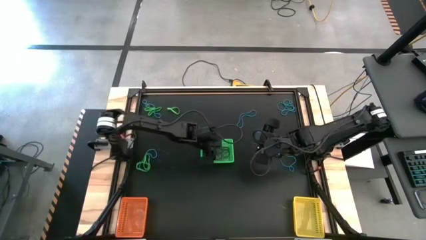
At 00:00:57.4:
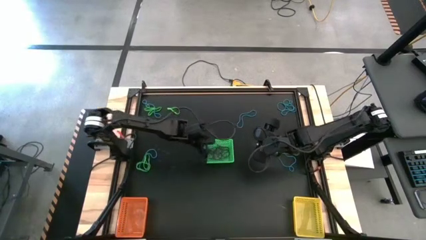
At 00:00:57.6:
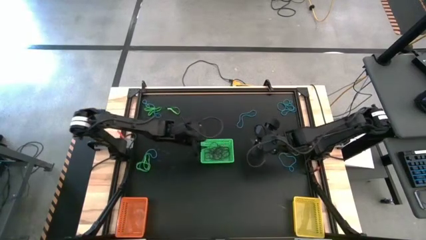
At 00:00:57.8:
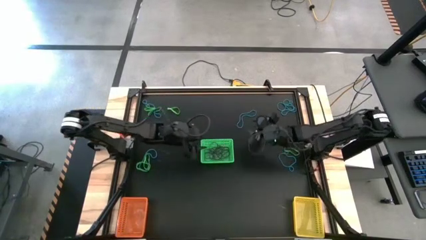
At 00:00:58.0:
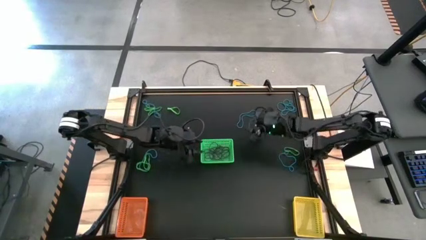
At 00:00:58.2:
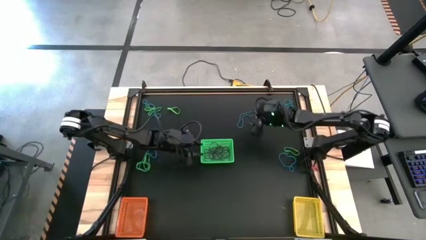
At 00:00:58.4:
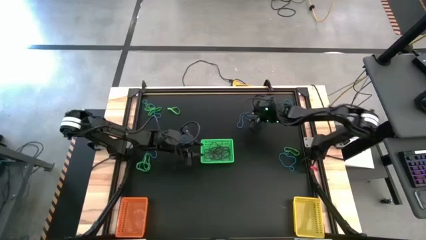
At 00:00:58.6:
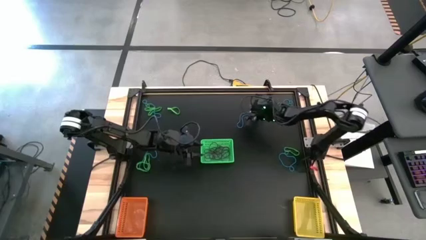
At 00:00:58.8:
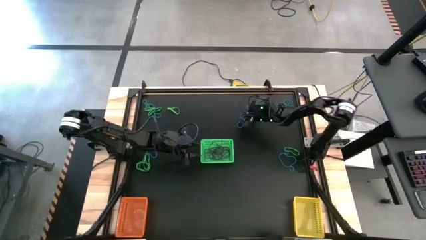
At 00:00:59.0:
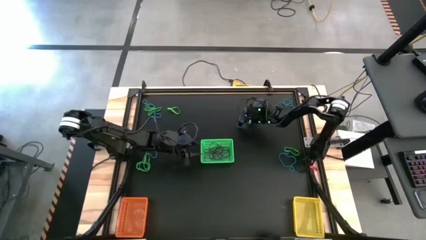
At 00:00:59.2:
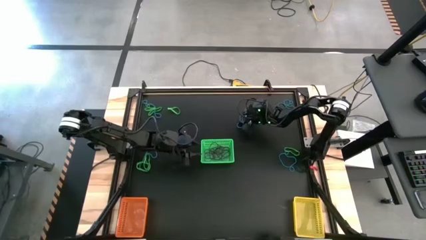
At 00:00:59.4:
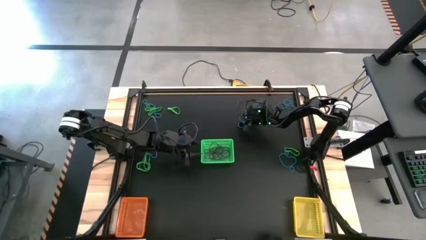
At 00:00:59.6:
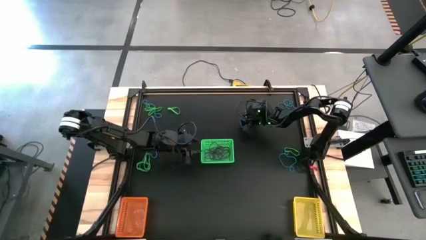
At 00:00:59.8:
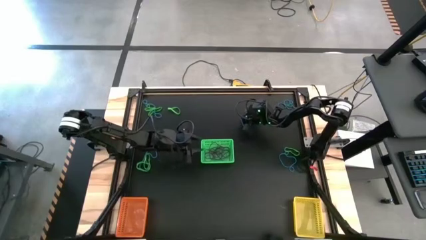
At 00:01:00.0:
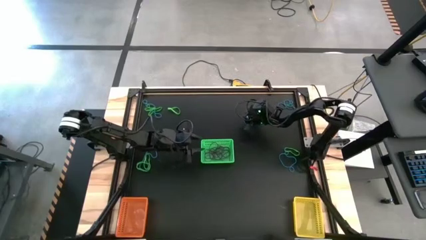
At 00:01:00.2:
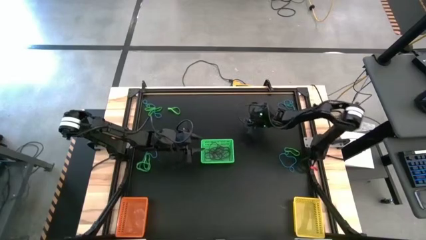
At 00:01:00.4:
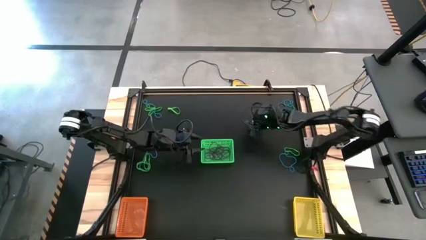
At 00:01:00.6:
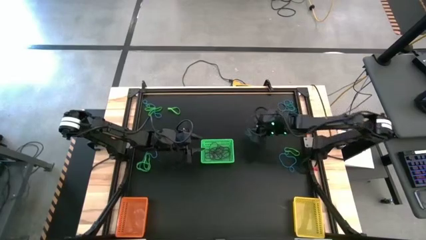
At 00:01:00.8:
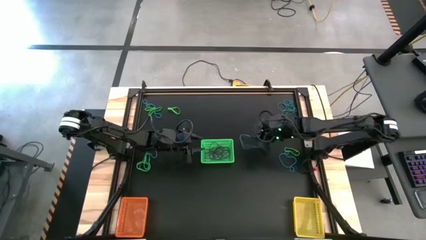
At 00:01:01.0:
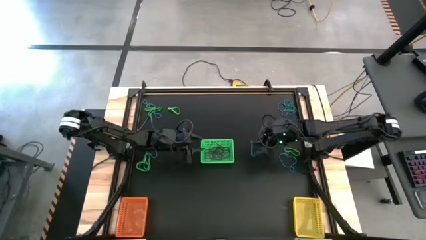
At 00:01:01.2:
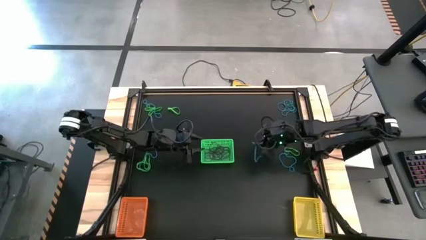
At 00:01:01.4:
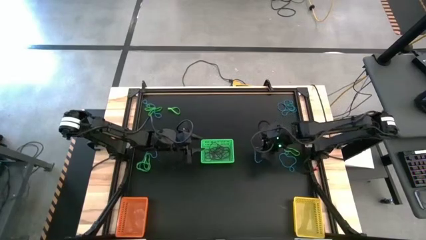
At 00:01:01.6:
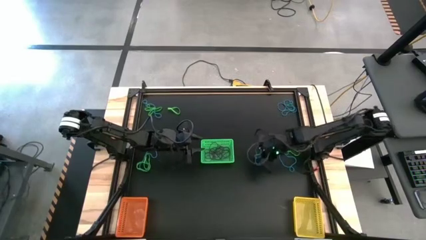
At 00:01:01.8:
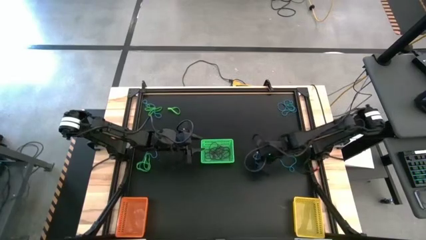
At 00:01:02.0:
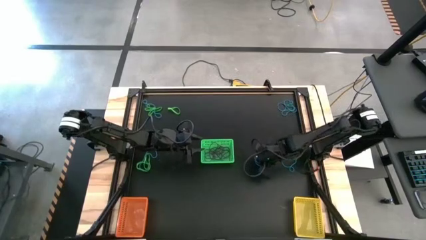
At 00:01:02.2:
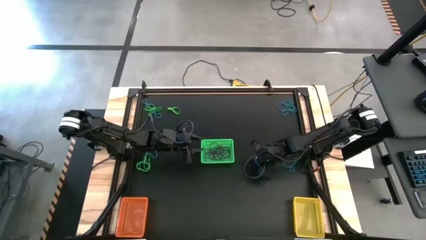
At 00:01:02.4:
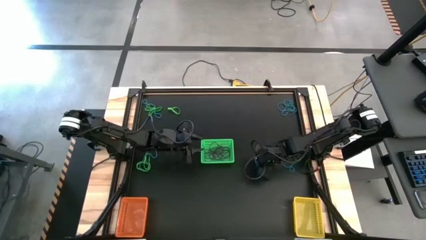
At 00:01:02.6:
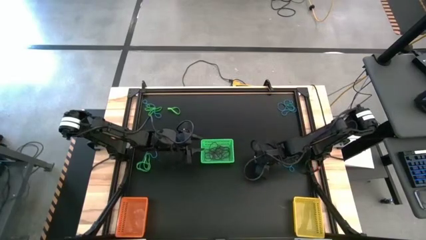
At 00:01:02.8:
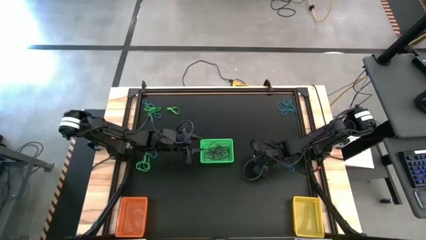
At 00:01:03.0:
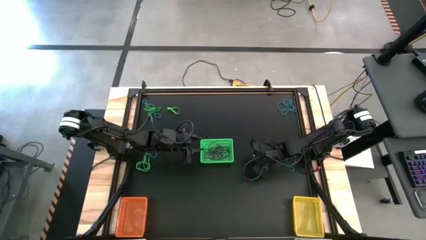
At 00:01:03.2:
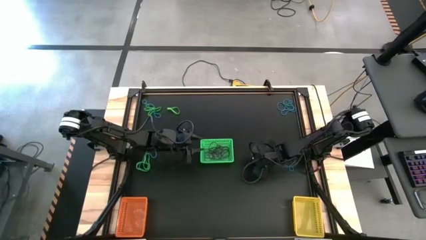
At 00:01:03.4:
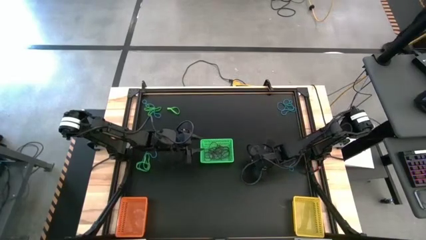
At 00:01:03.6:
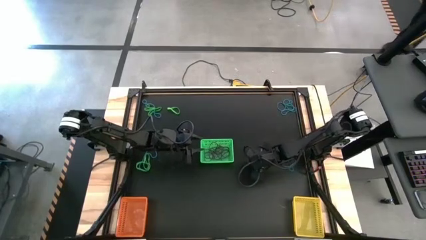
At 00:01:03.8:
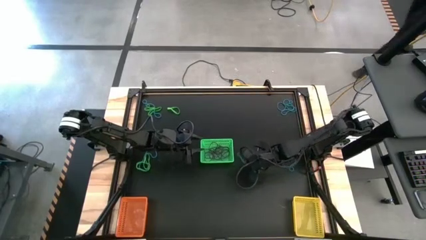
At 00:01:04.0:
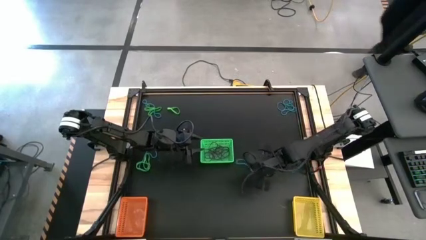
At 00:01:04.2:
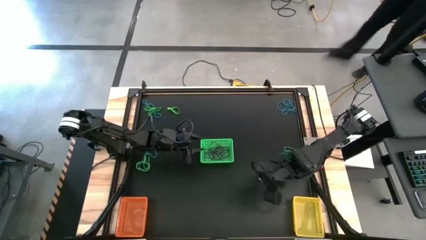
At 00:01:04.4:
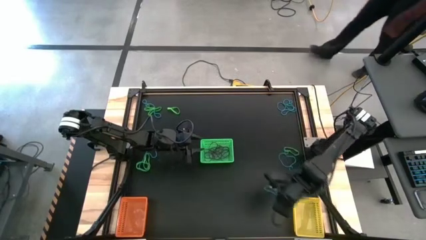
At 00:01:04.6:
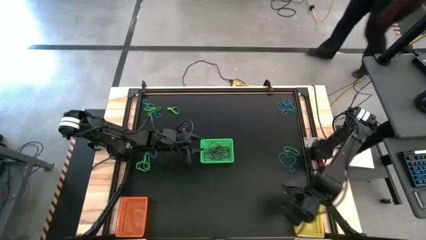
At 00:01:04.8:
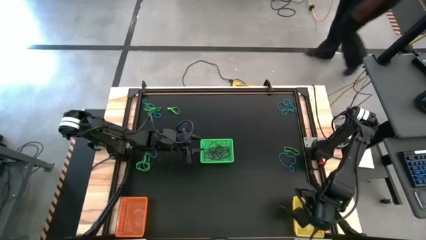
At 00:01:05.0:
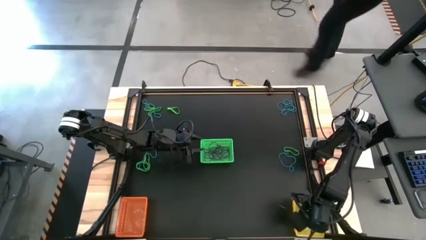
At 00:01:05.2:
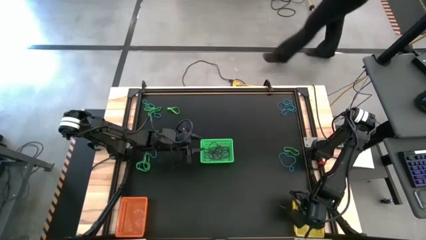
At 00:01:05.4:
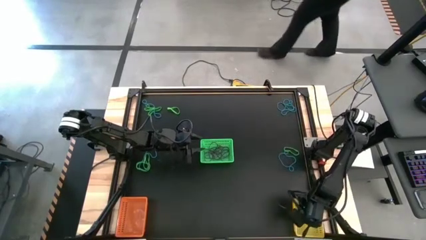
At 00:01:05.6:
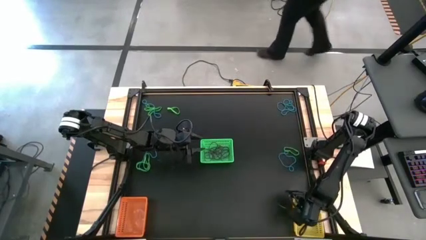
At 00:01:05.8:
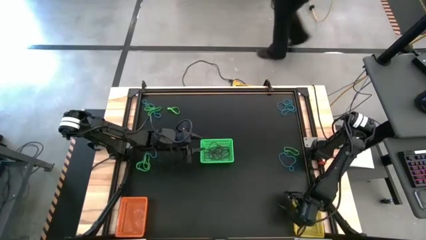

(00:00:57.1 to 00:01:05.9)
Task: Sort rubber bands into baskets
Put the blue rubber band into the yellow basket

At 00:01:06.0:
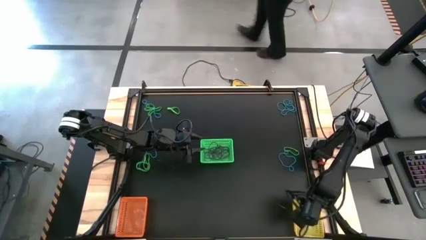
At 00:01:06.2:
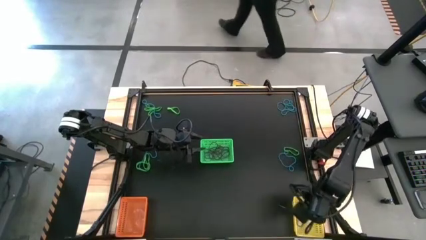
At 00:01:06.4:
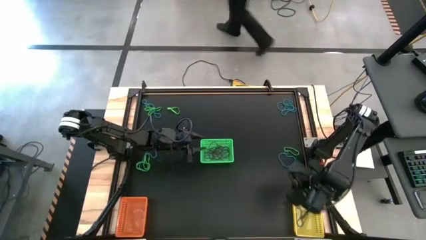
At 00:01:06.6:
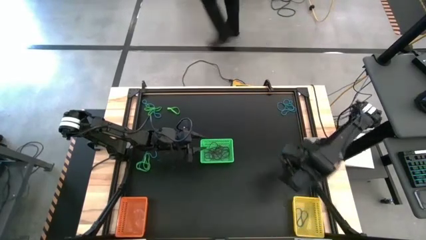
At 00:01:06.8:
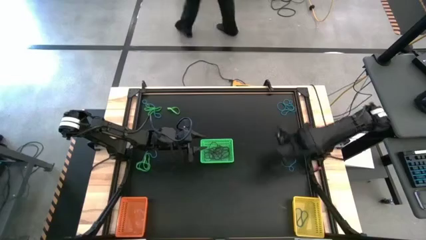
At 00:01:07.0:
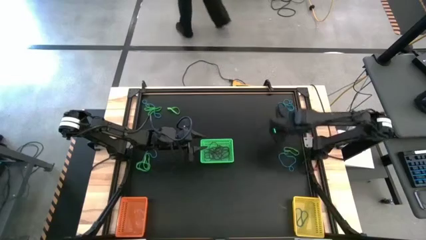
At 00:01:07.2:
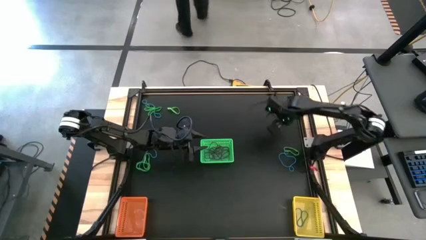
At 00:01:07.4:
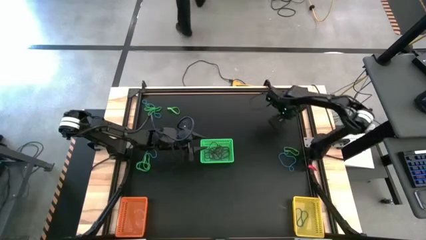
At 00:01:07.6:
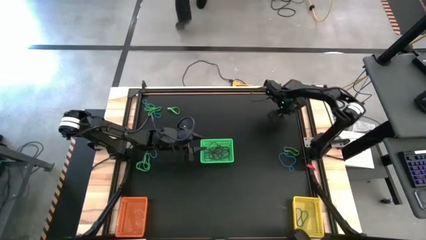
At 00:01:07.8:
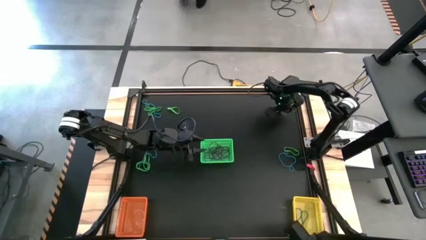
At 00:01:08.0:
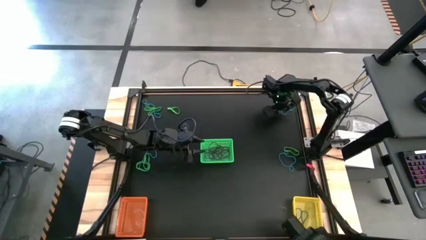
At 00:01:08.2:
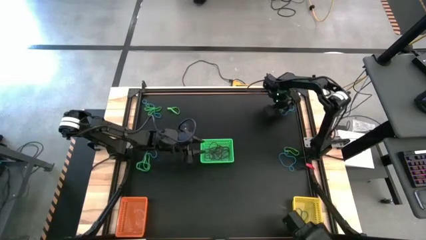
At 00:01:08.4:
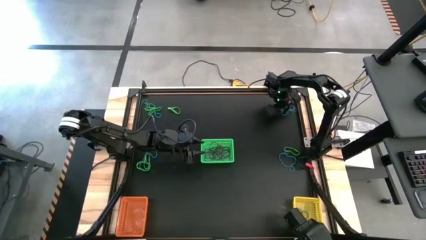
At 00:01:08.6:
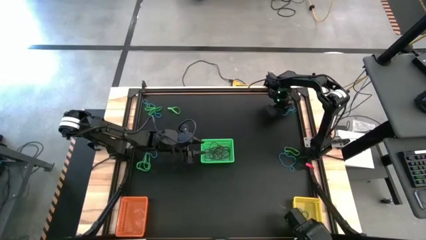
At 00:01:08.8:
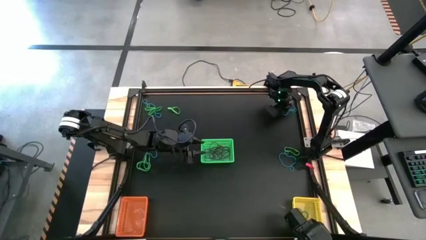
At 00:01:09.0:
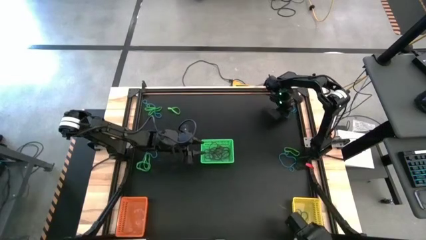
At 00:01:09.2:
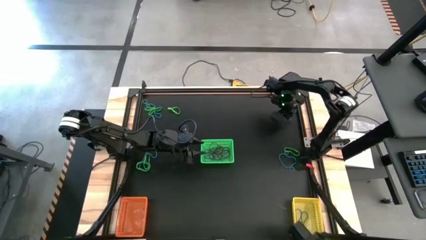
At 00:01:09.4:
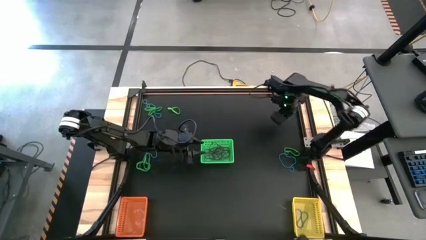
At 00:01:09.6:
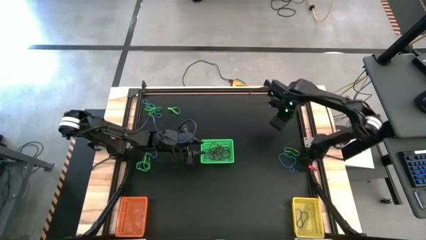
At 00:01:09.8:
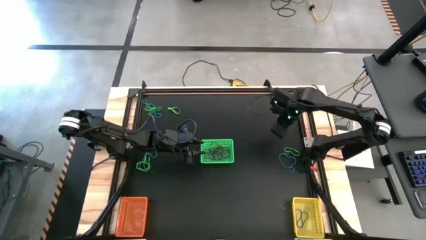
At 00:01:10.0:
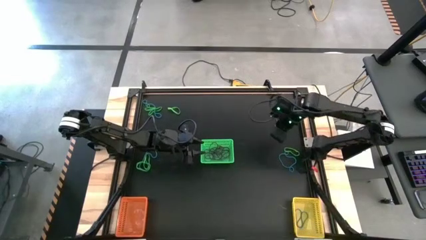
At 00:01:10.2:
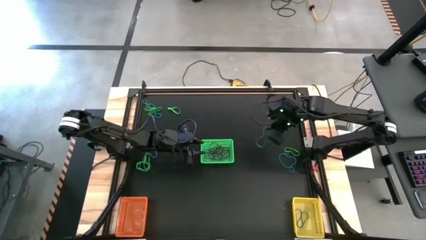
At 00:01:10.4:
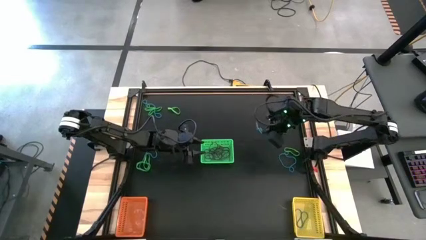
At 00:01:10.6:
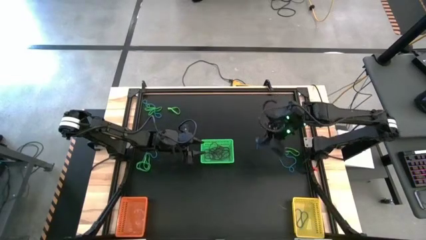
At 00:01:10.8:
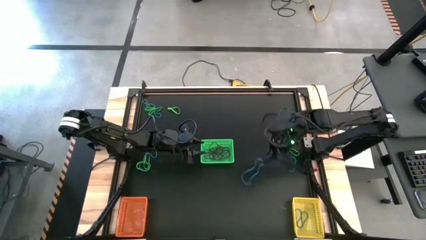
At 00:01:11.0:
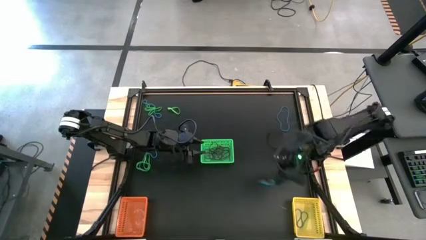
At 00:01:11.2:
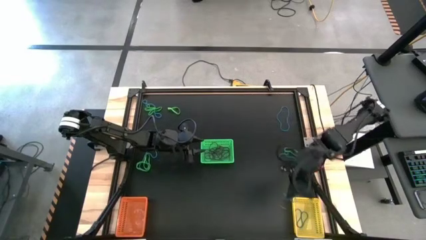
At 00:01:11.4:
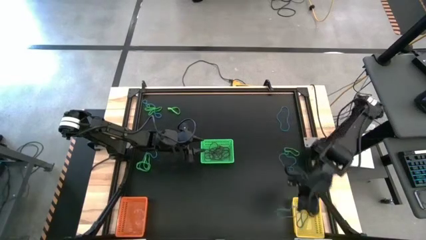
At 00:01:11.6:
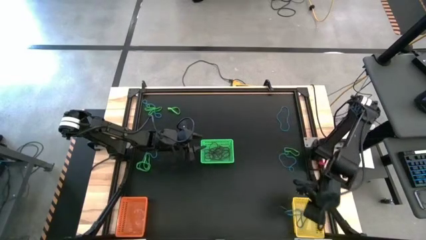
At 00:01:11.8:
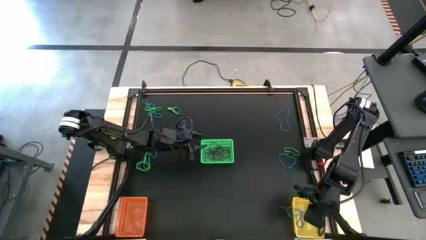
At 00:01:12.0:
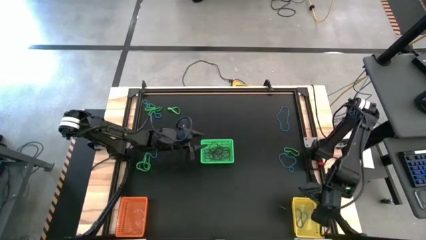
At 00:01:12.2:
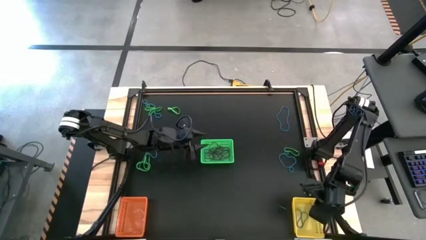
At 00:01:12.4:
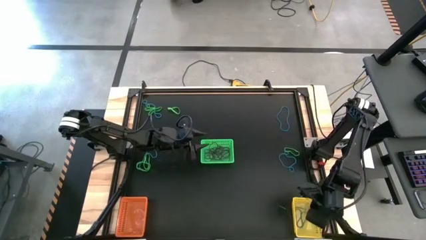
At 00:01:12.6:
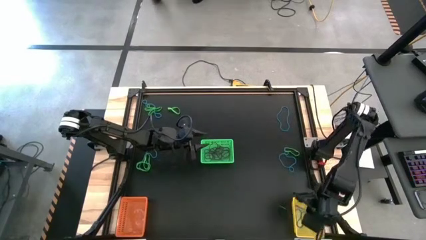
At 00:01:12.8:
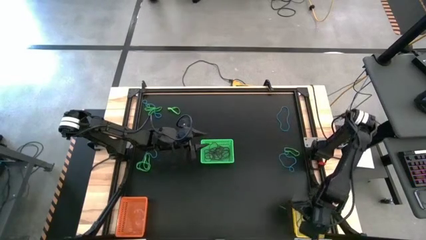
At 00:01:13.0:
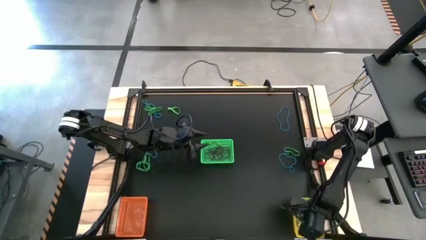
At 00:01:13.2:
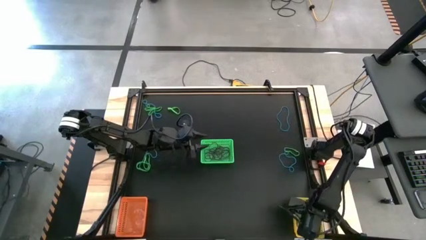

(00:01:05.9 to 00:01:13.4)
Put the blue rubber band into the yellow basket
